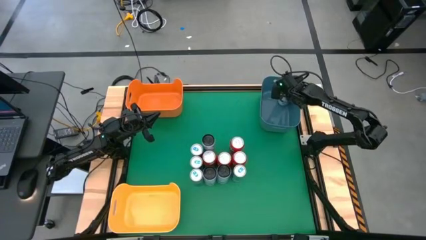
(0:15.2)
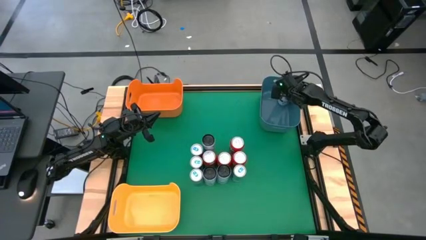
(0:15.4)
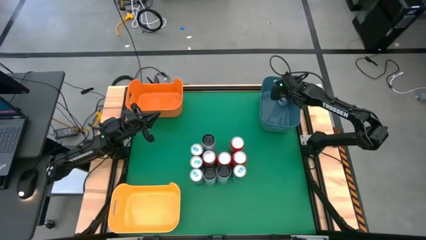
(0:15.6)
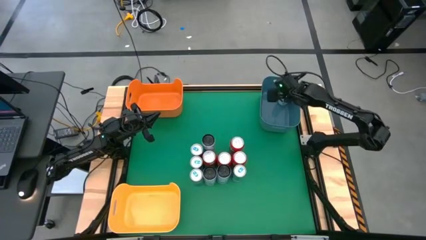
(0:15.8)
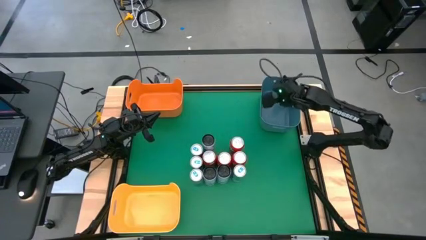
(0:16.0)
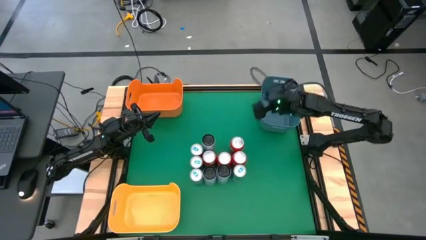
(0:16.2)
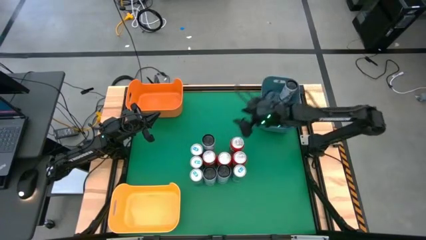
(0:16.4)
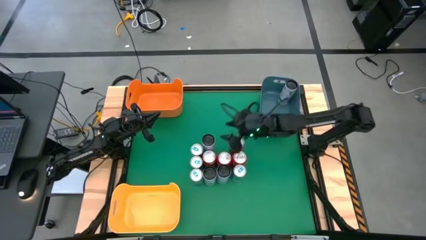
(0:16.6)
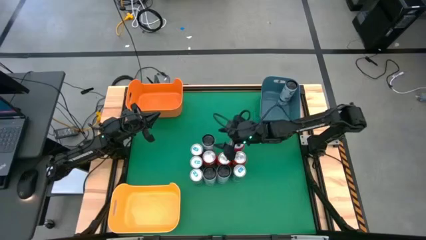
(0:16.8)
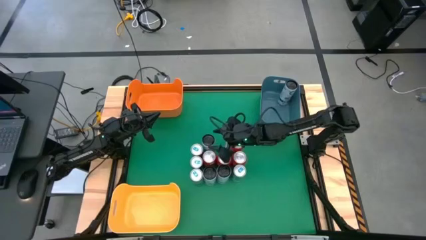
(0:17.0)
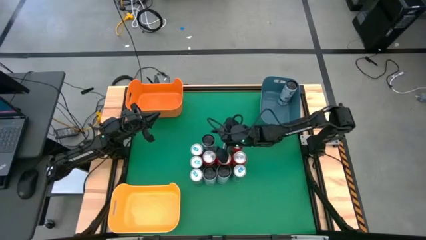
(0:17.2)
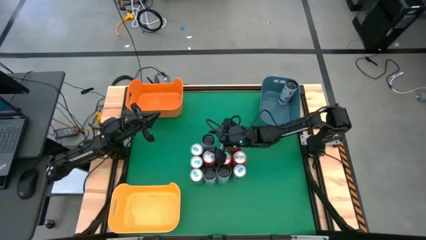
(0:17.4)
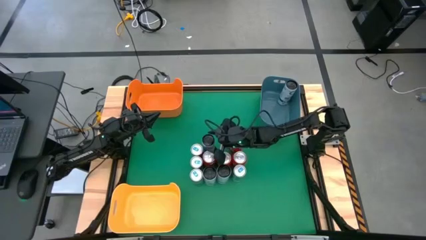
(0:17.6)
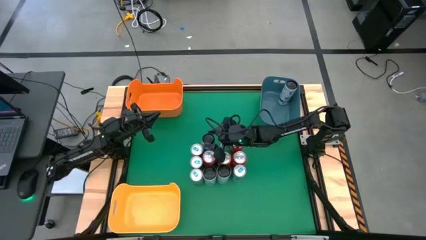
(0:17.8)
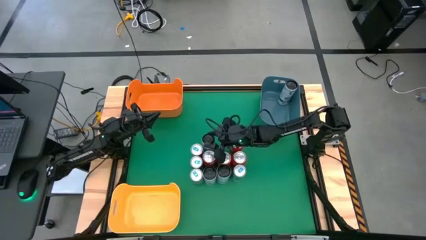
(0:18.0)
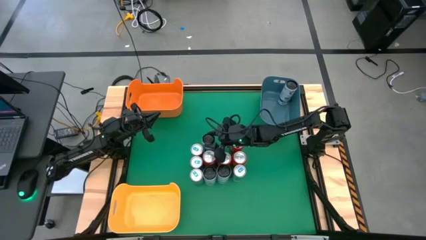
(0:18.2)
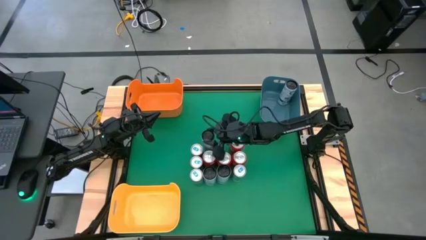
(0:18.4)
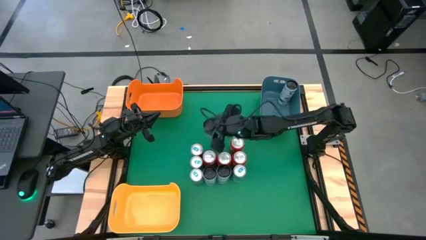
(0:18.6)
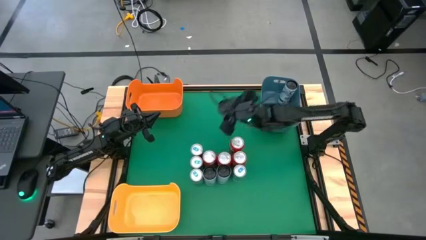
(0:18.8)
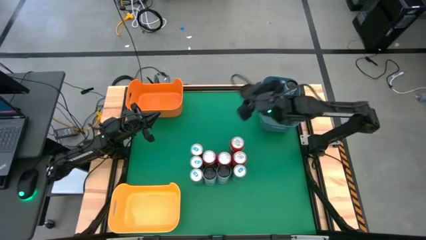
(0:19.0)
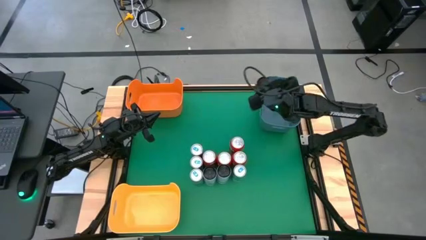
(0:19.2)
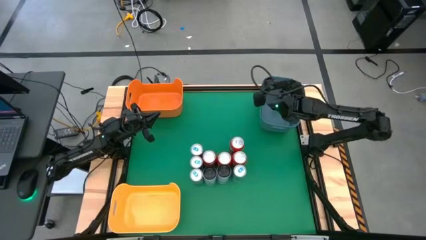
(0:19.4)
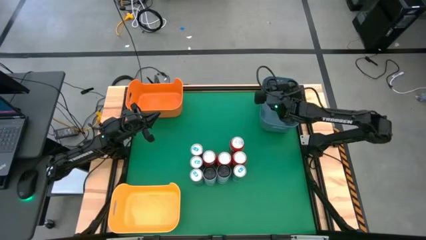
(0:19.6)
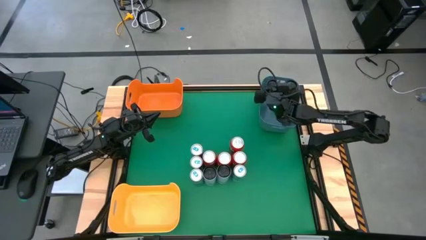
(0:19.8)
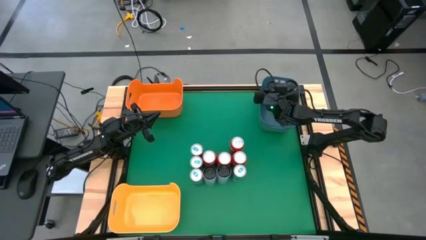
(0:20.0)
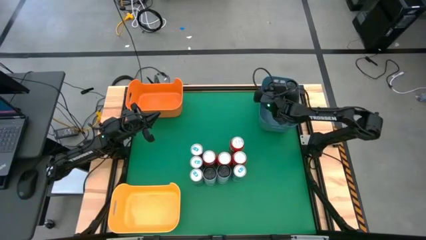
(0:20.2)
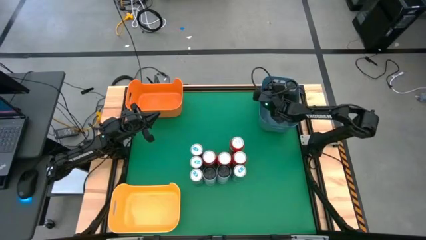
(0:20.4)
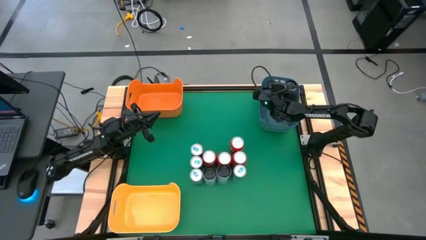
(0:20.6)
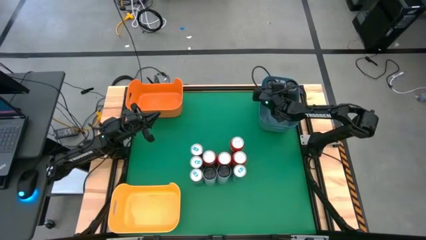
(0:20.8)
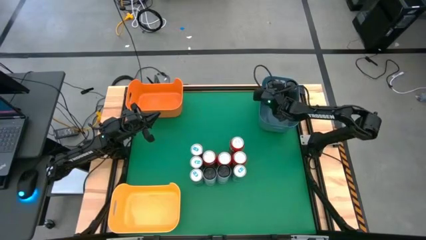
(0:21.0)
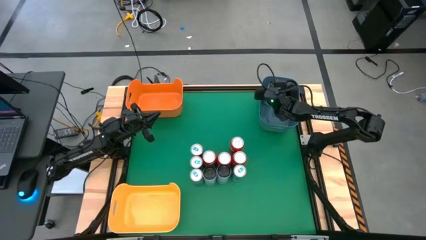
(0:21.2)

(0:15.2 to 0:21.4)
Task: Sort soda cans
Put the white-blue soda can into the blue bin

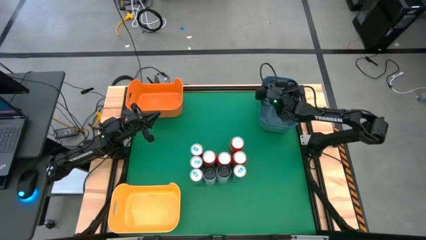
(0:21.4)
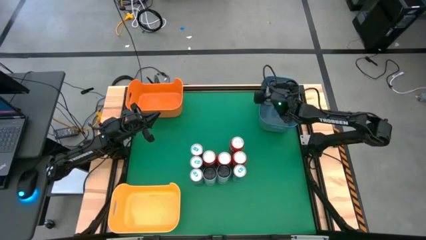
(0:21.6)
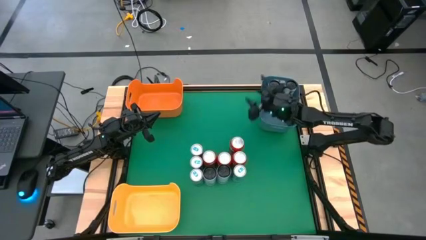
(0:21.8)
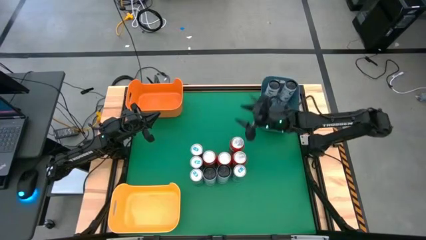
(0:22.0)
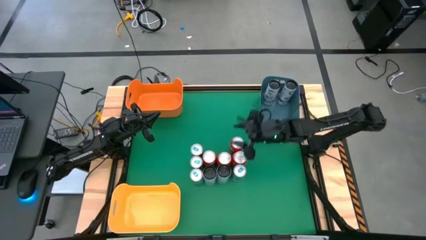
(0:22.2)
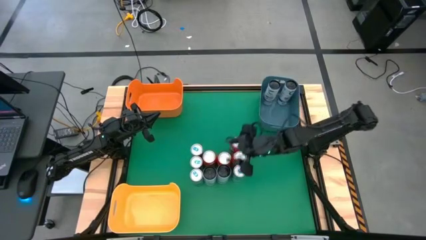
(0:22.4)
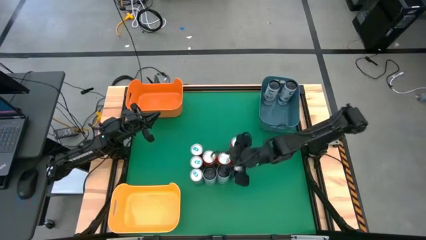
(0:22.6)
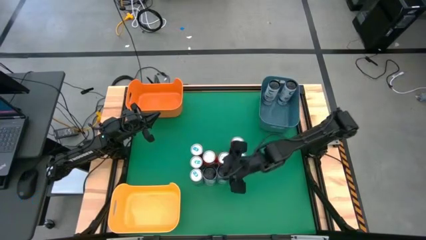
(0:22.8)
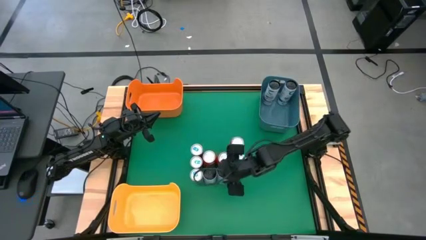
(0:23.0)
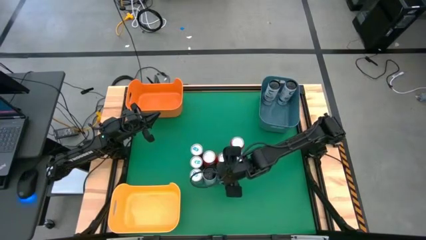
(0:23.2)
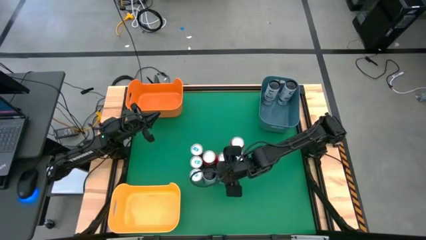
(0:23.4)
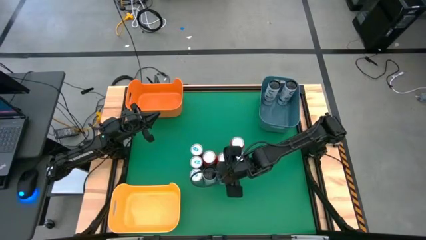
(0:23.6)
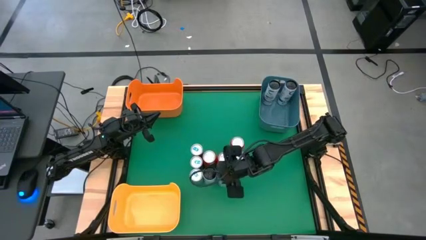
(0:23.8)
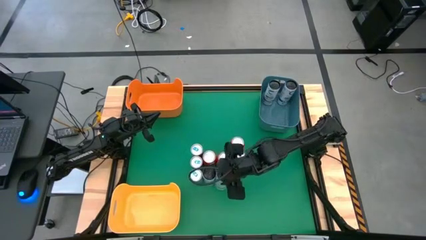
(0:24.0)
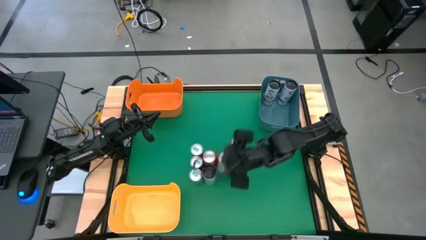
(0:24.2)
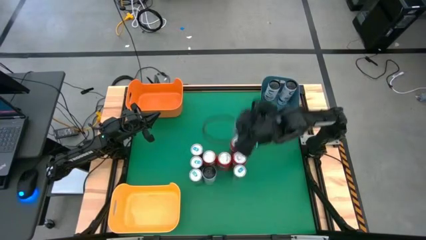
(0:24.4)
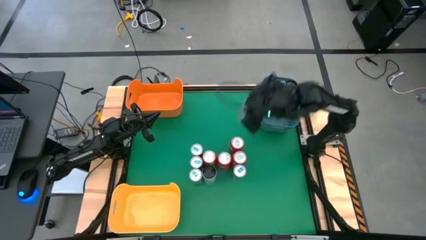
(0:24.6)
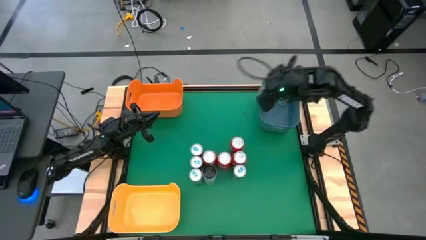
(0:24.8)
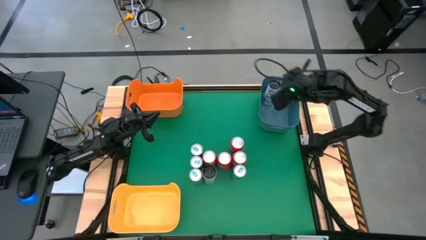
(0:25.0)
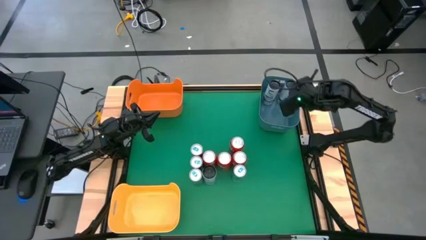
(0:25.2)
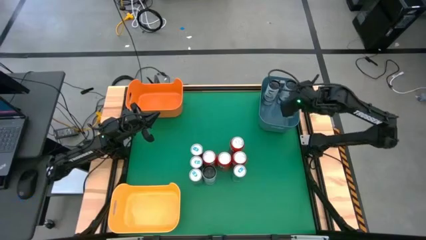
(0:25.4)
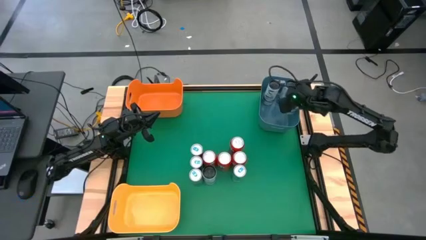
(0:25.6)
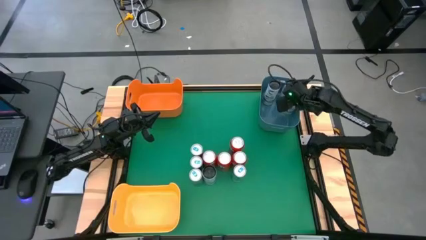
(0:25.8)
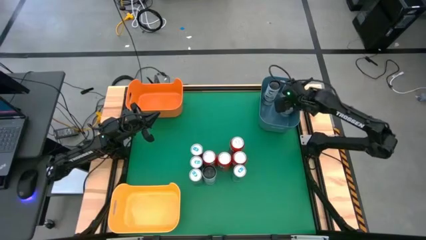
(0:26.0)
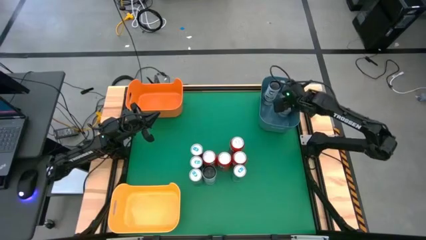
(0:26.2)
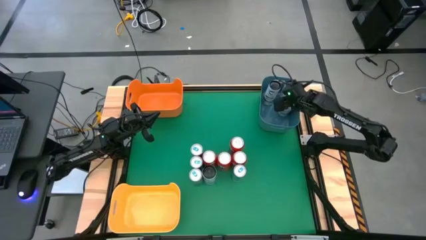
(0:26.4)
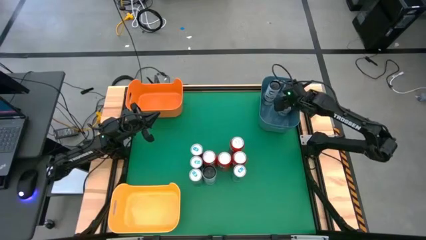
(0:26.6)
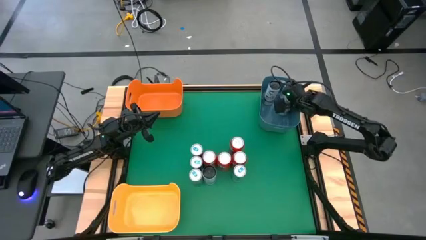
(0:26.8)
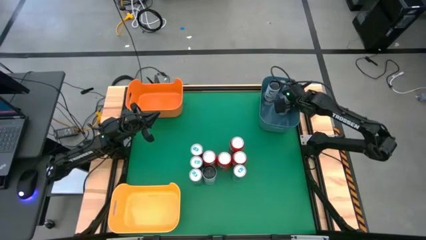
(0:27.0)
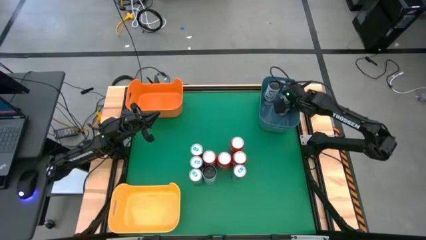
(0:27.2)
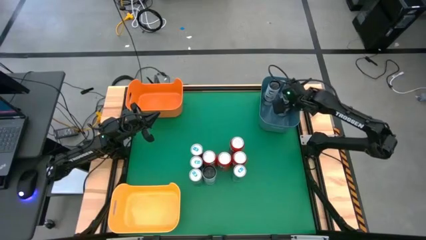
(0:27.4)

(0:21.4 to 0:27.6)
Put the white-blue soda can into the blue bin

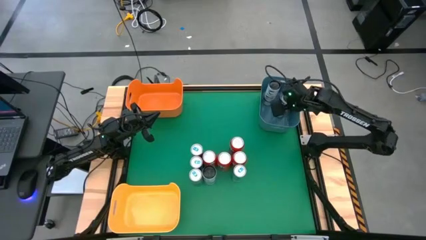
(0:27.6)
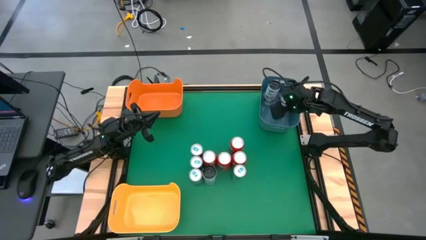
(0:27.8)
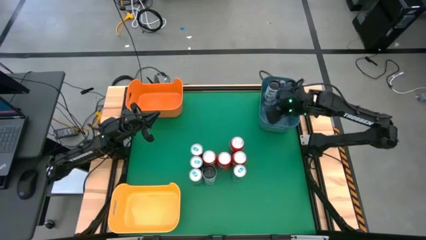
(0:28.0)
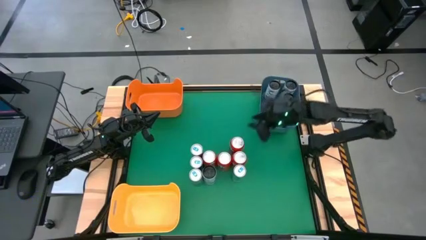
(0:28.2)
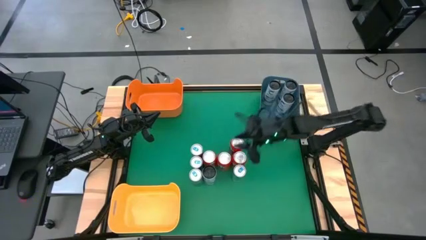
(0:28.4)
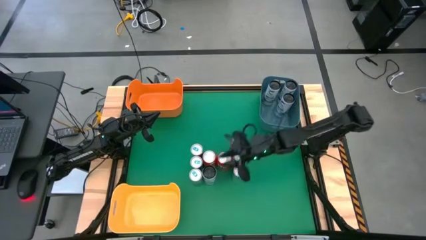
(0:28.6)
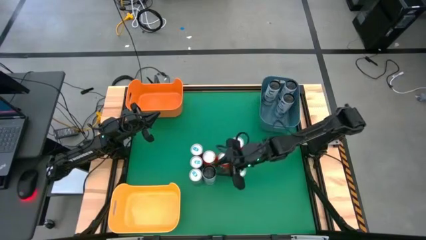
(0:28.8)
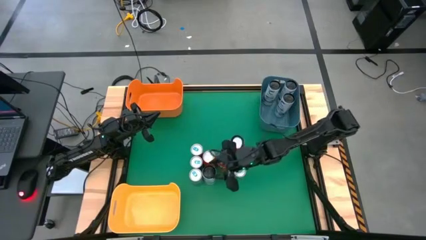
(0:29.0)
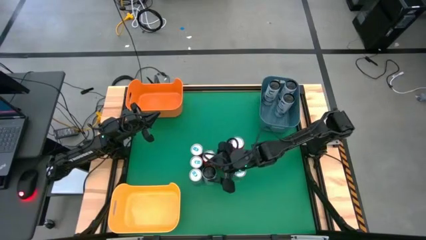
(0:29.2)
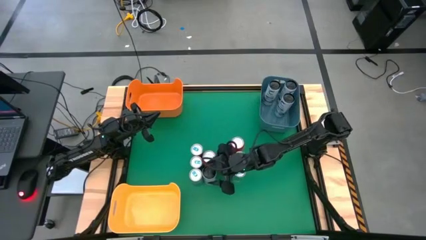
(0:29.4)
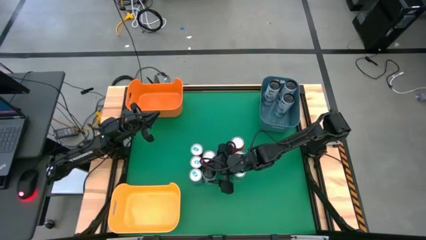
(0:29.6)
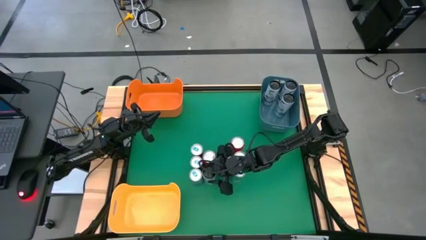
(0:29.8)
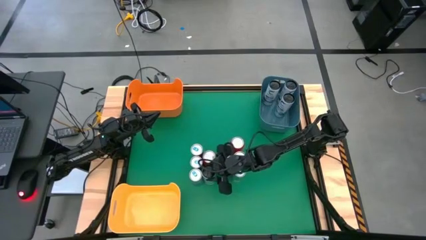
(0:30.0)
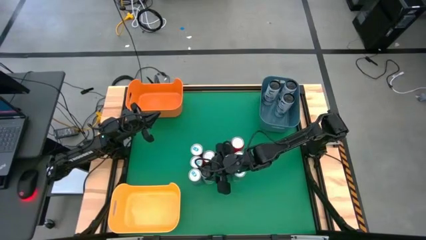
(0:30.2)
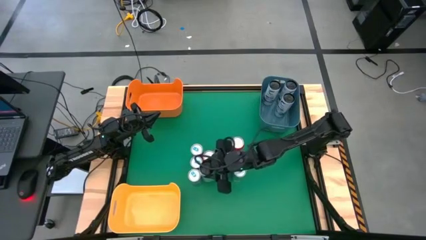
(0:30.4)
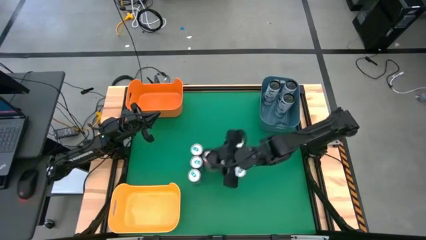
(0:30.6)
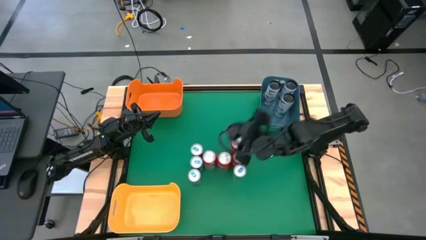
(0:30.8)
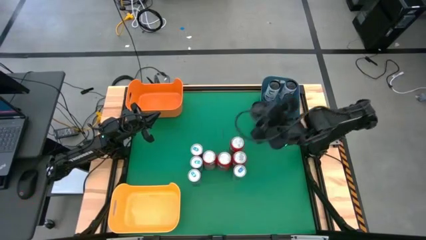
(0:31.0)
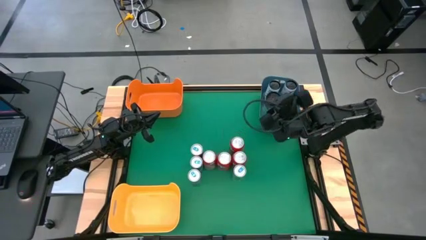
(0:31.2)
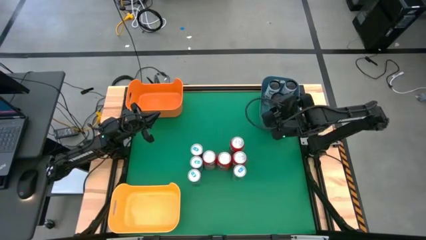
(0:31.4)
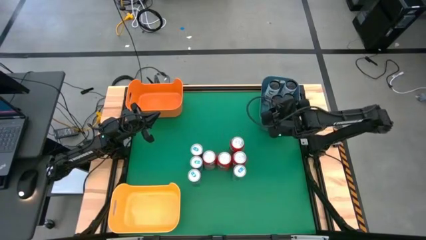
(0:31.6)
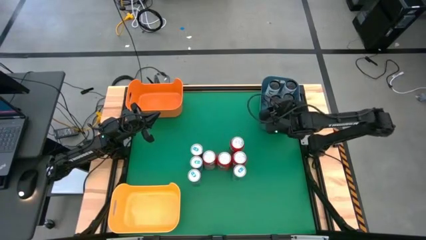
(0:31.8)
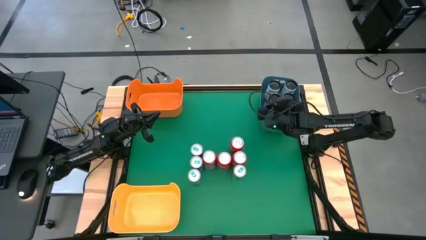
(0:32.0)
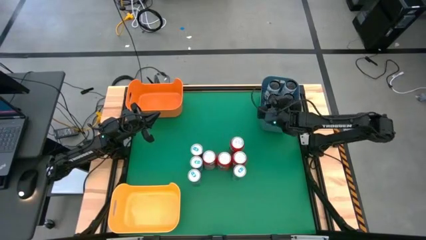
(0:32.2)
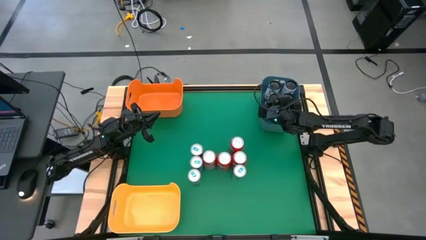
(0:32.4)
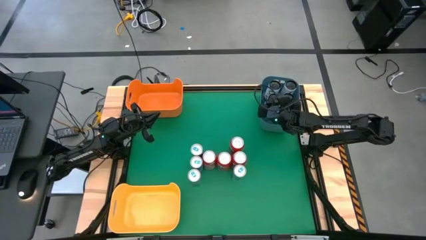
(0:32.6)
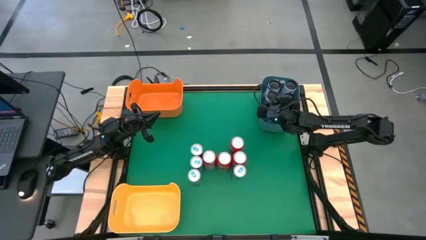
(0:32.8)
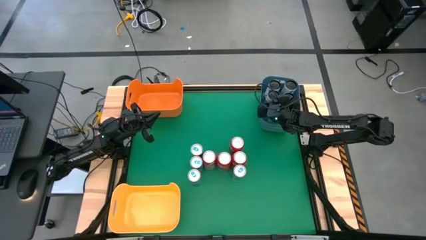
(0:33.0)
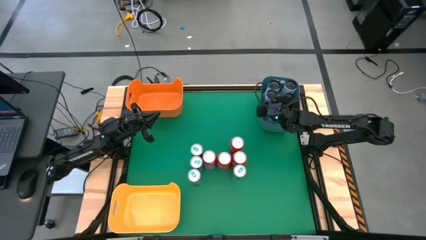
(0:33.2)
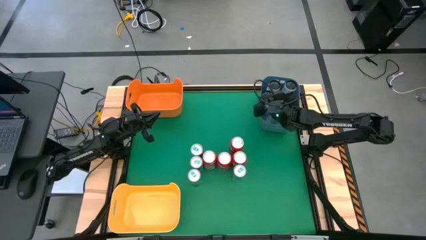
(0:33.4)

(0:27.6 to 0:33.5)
Put the white-blue soda can into the blue bin
